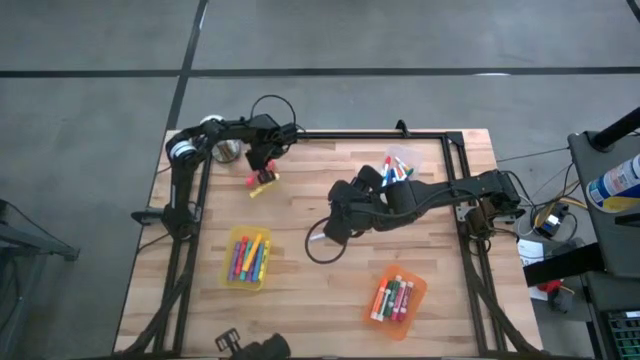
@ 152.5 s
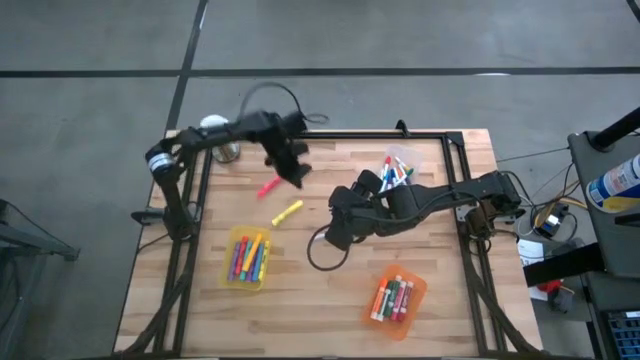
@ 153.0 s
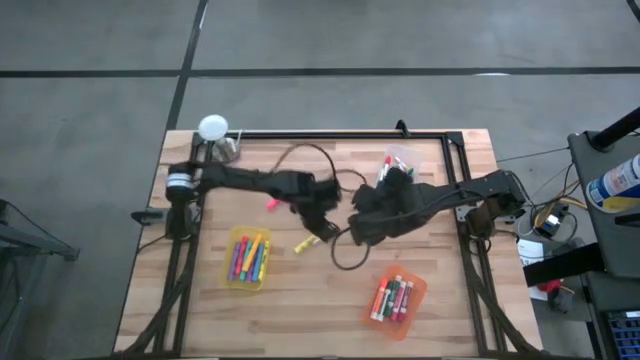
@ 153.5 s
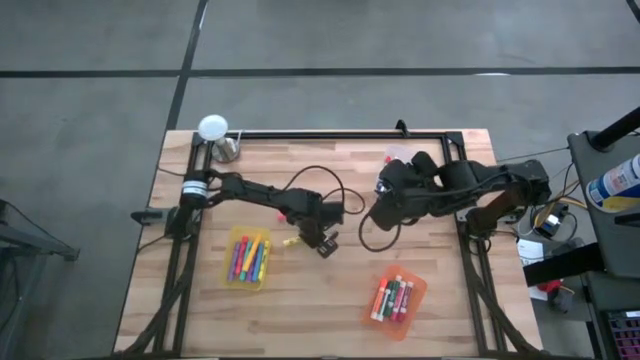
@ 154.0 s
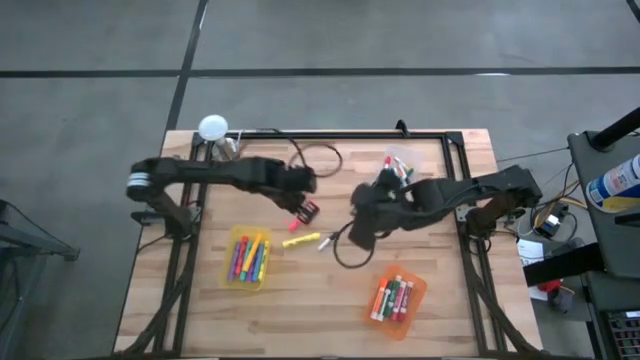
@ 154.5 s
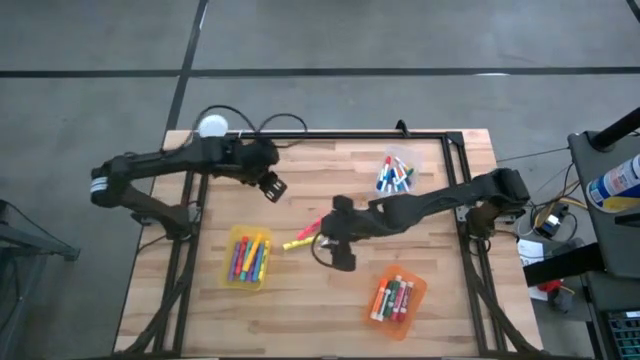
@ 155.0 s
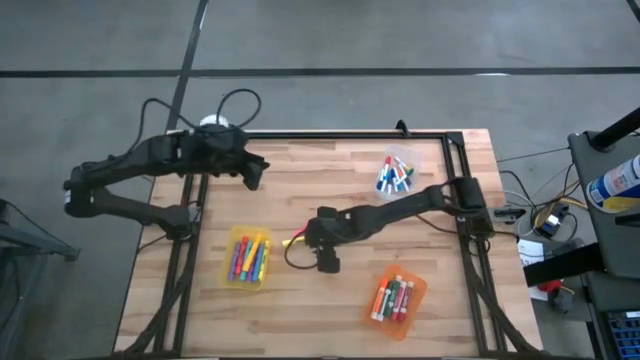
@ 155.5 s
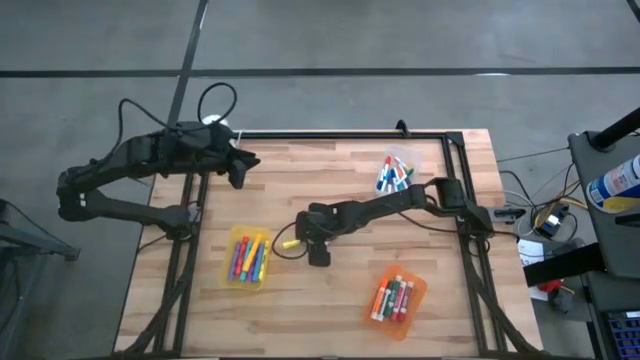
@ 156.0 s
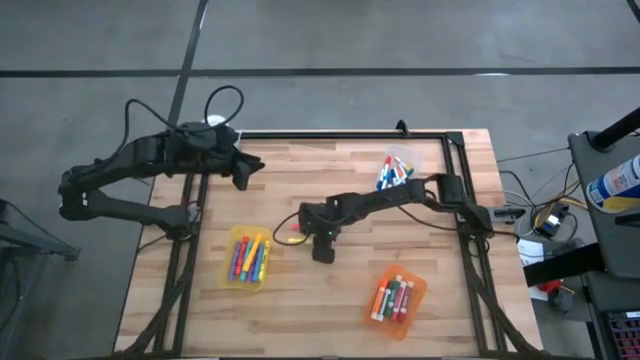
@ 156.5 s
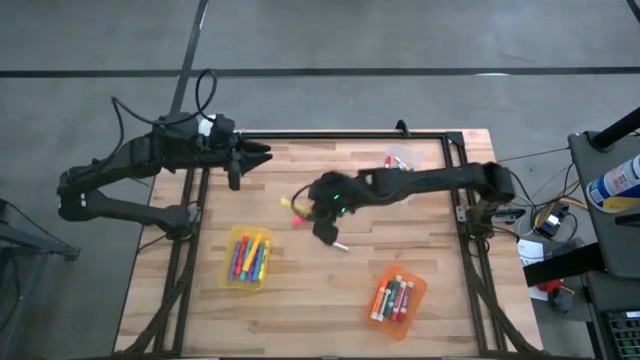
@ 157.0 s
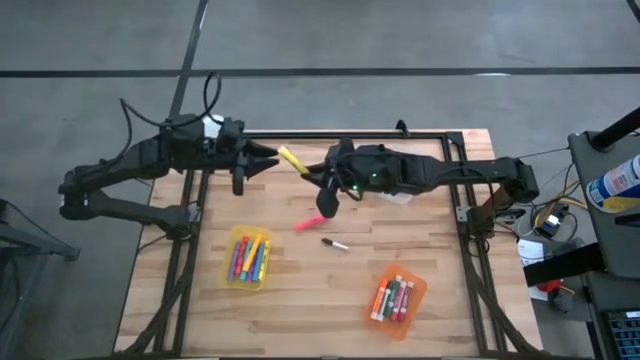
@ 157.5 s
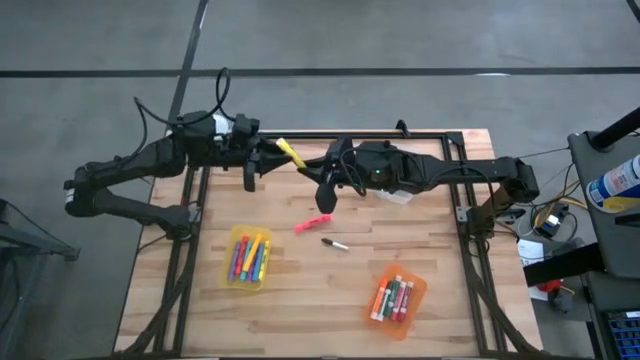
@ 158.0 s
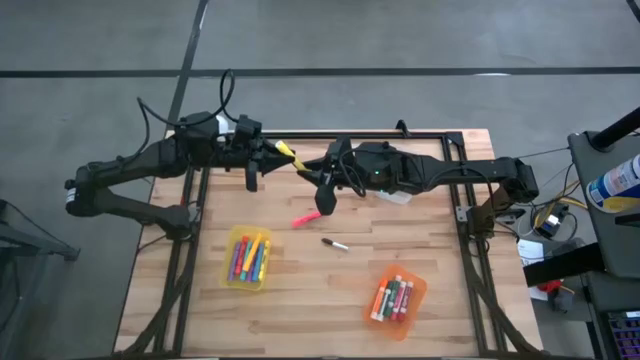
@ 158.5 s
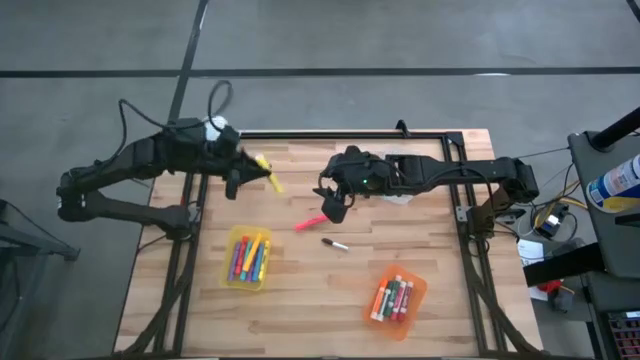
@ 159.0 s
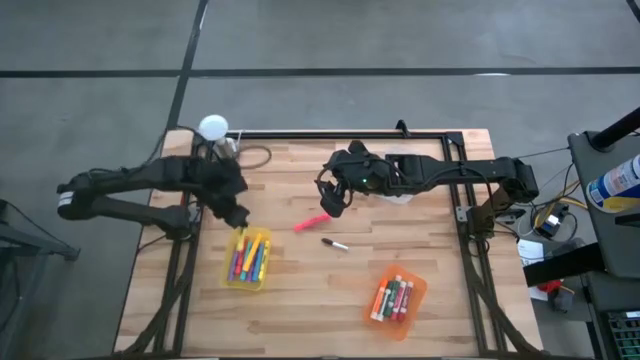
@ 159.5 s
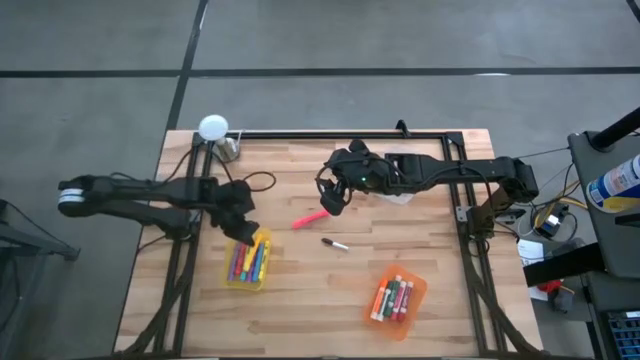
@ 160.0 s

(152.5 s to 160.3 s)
Task: Pick & Place Markers
Put the large yellow highlighter pen into the yellow bin

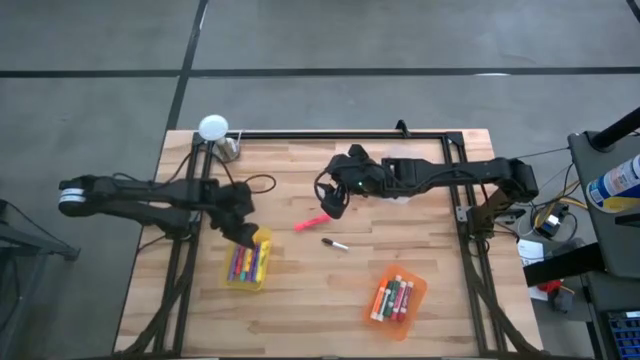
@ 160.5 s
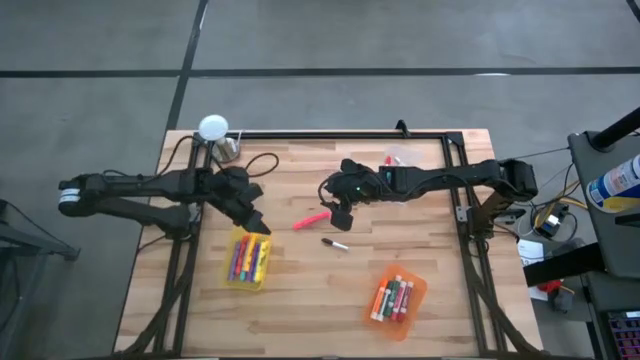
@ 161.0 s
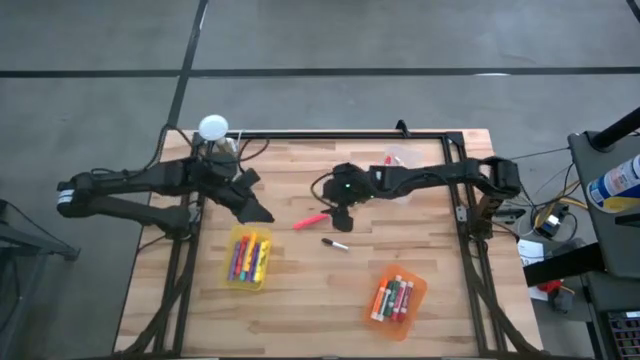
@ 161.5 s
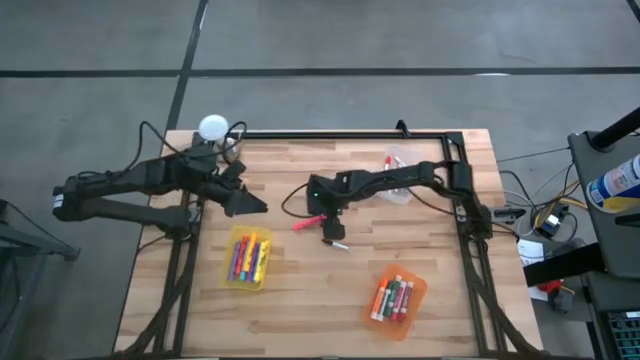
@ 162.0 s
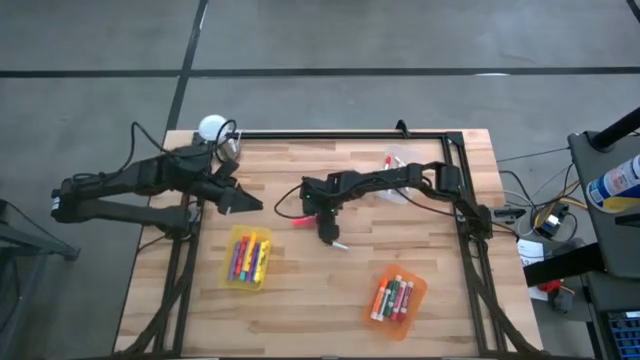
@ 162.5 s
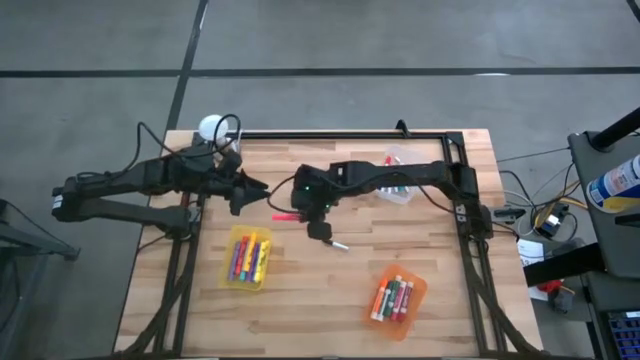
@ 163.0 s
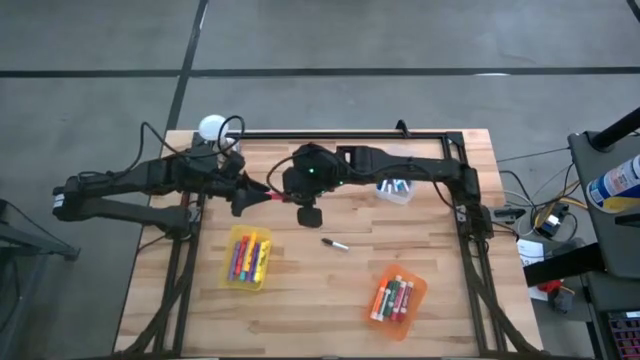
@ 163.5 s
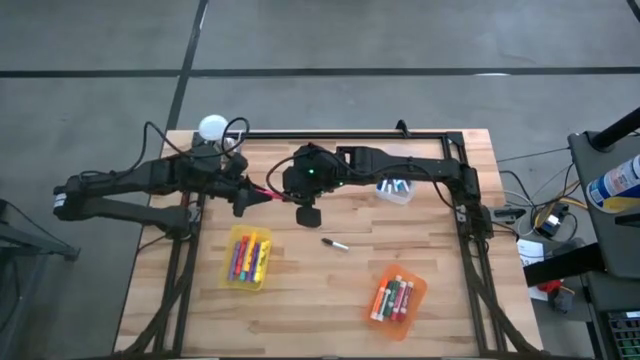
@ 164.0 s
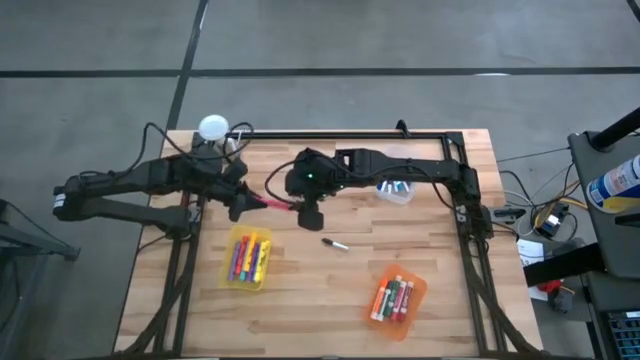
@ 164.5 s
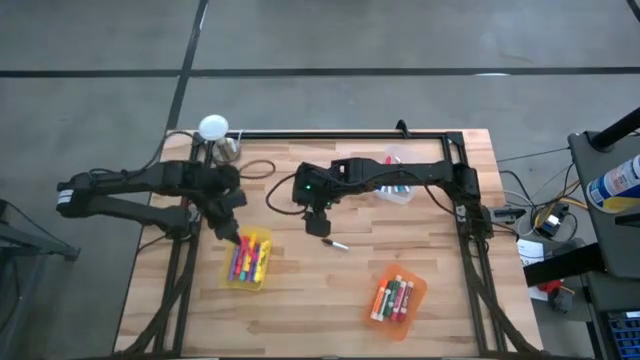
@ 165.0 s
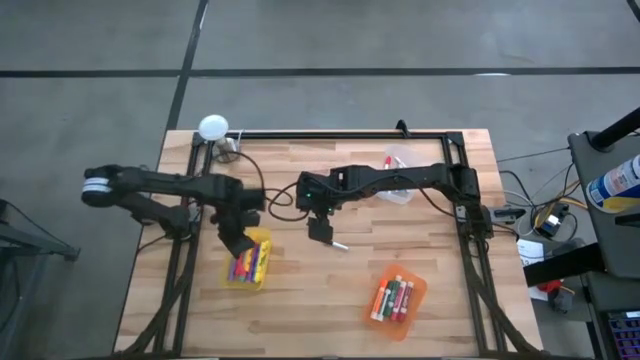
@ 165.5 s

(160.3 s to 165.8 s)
Put the large dark pink highlighter pen into the yellow bin

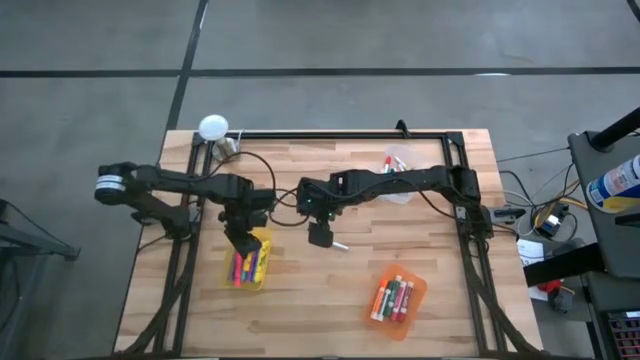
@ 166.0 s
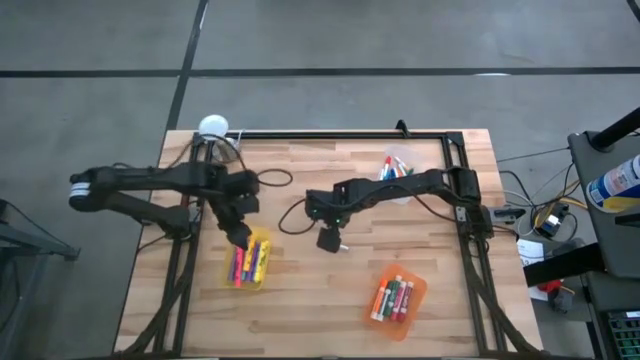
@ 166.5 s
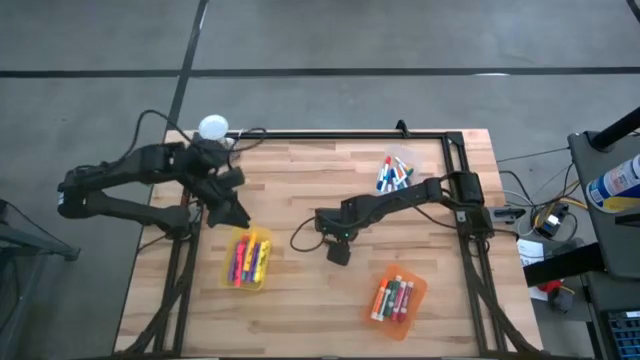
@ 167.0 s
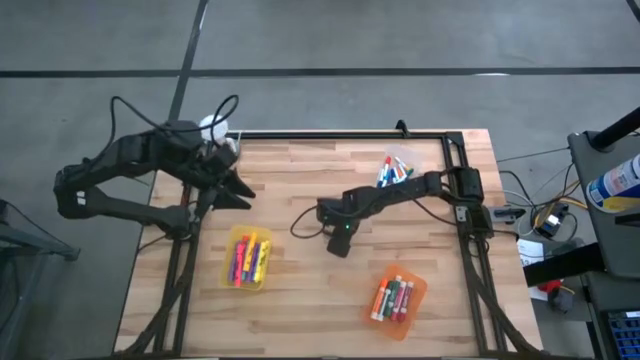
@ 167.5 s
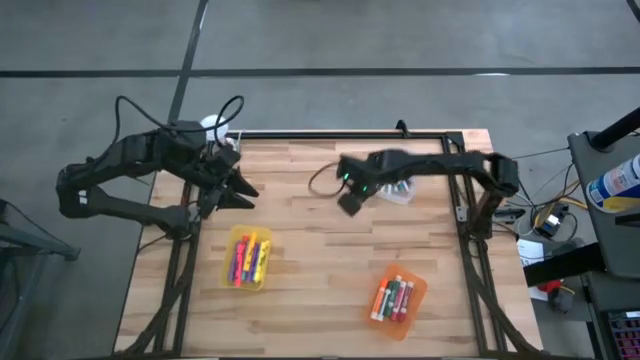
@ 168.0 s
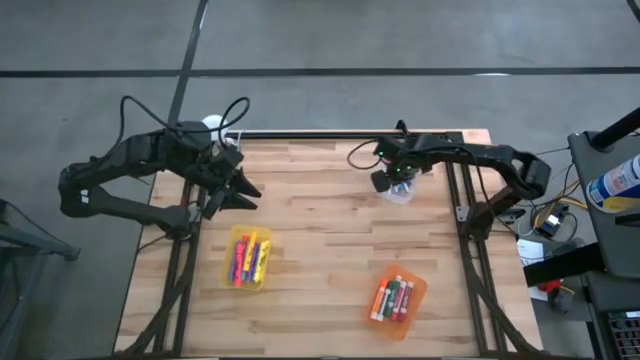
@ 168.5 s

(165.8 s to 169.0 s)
Put the small black highlighter pen into the transparent bin

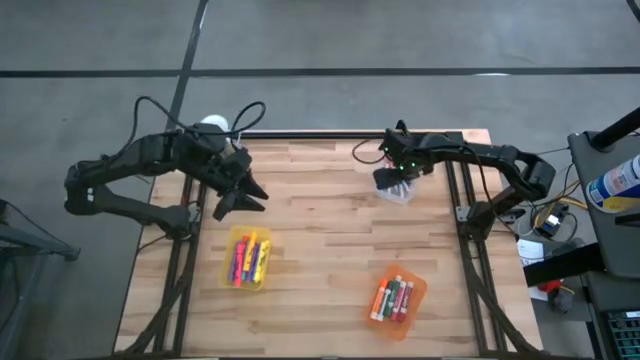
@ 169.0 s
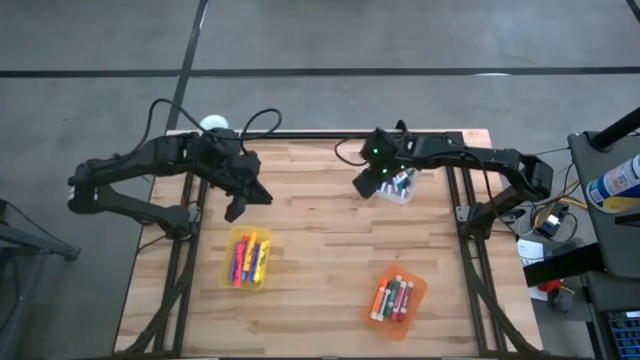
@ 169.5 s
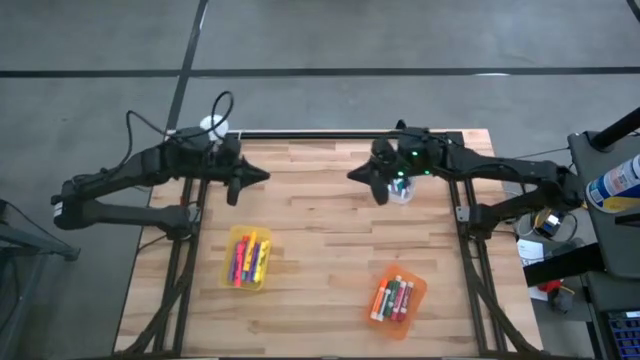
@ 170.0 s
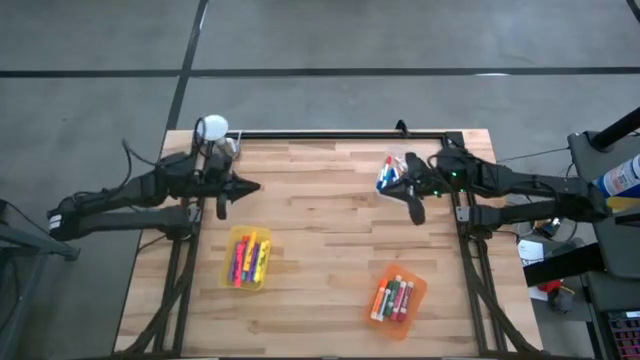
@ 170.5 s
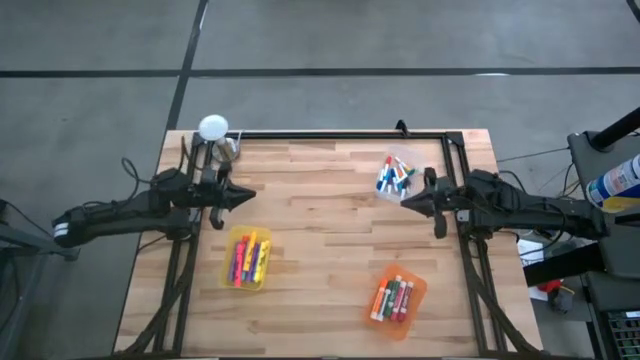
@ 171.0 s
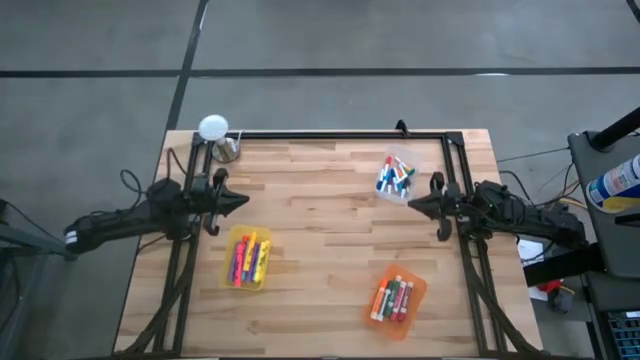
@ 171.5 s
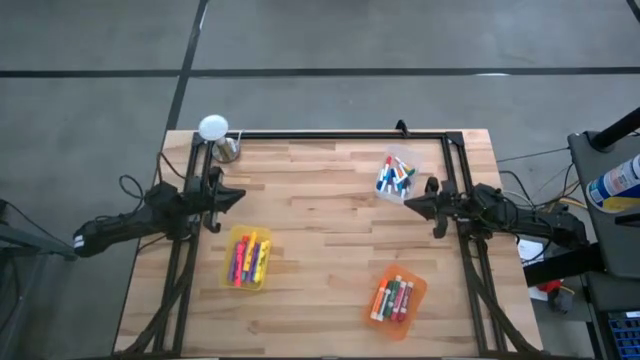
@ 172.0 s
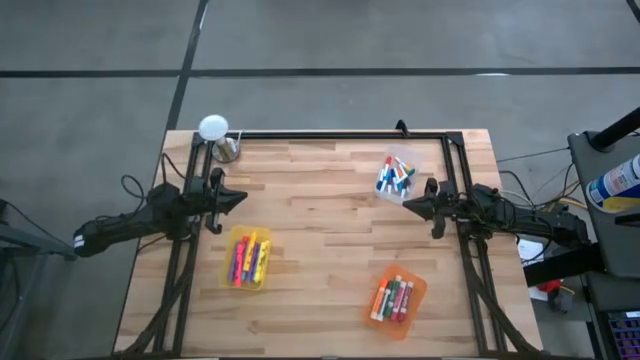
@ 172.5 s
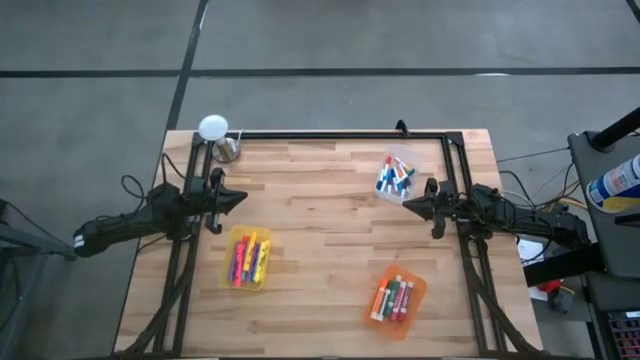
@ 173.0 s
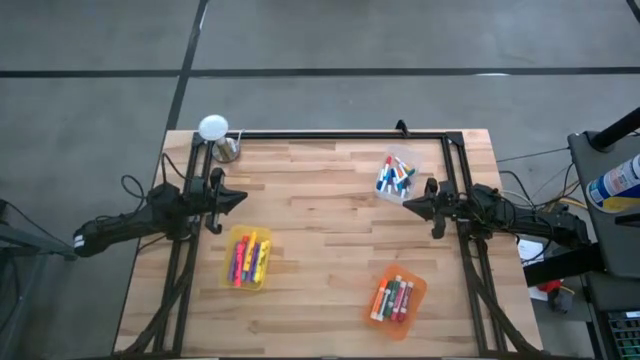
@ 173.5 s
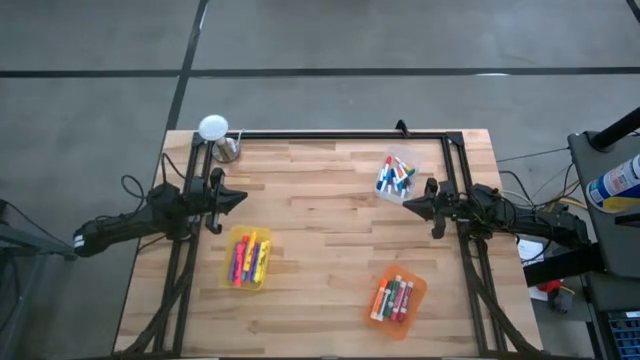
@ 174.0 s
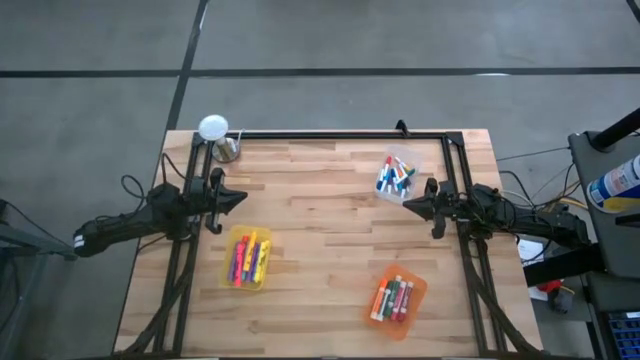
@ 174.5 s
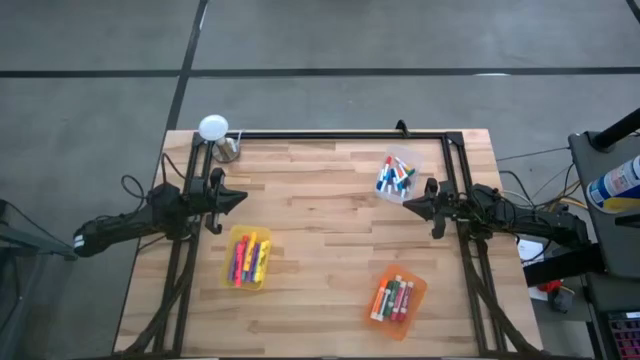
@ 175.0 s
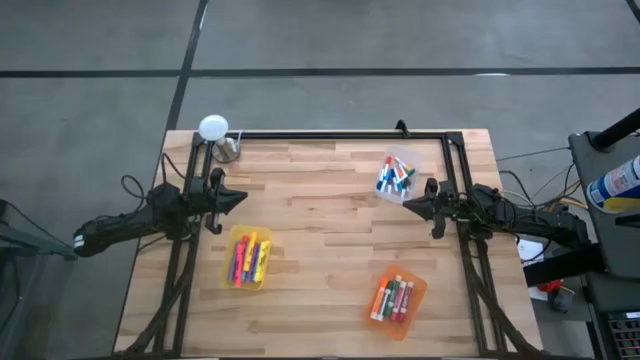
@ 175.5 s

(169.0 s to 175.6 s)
Return to Home Position
